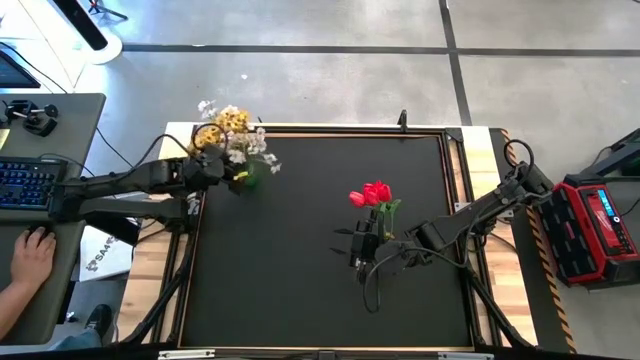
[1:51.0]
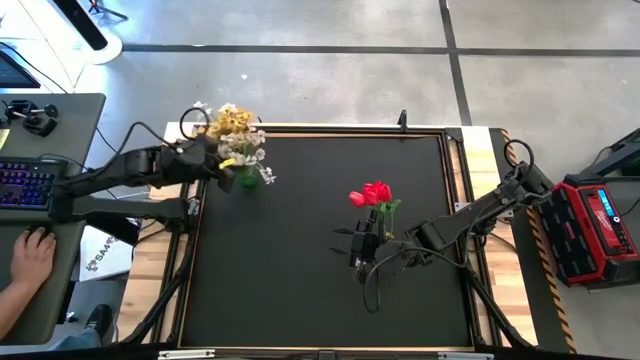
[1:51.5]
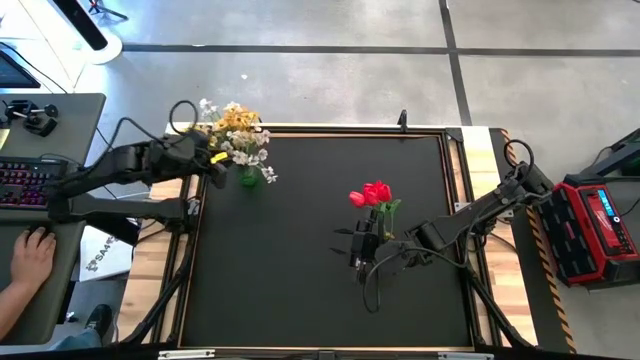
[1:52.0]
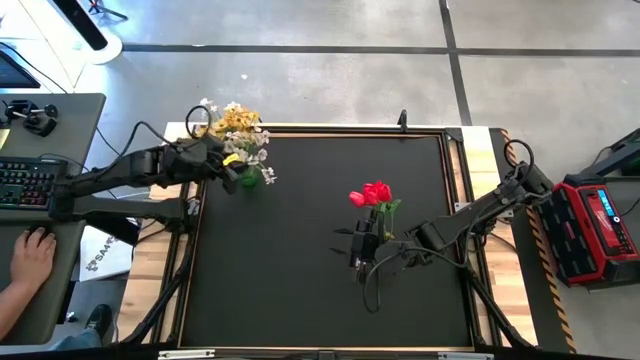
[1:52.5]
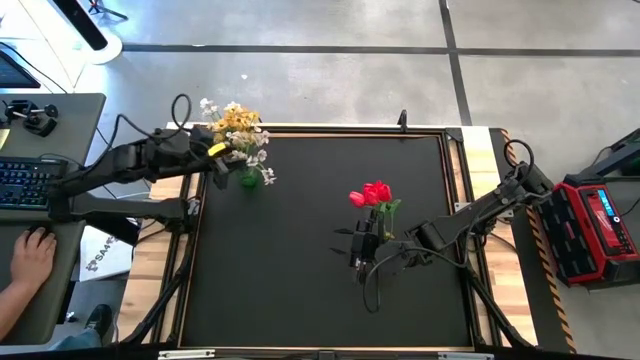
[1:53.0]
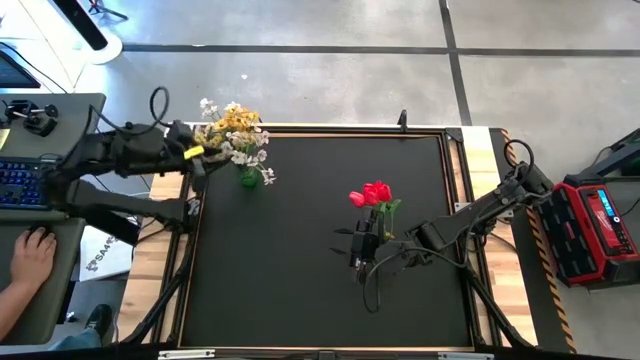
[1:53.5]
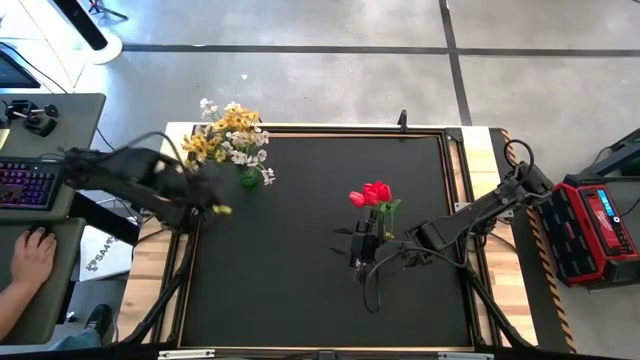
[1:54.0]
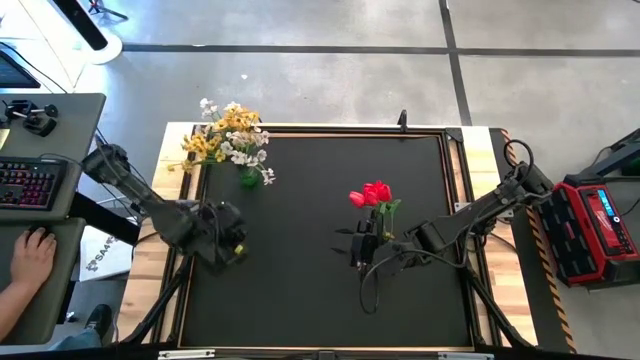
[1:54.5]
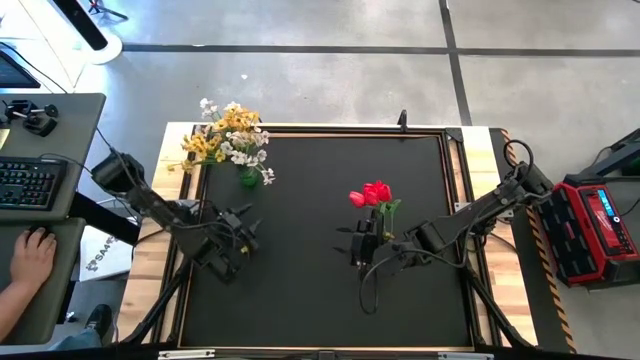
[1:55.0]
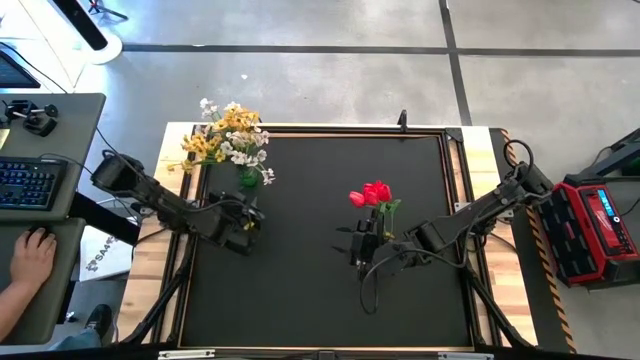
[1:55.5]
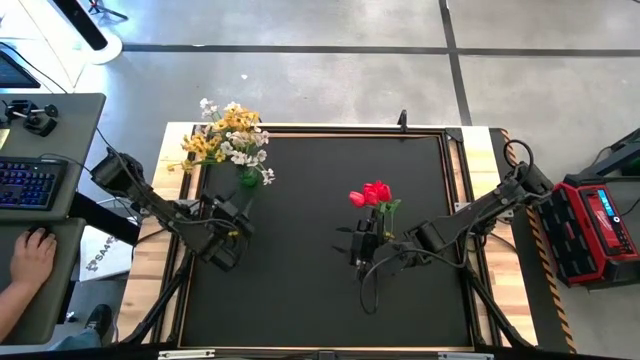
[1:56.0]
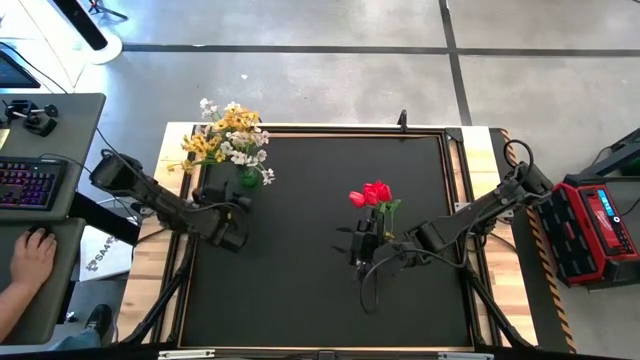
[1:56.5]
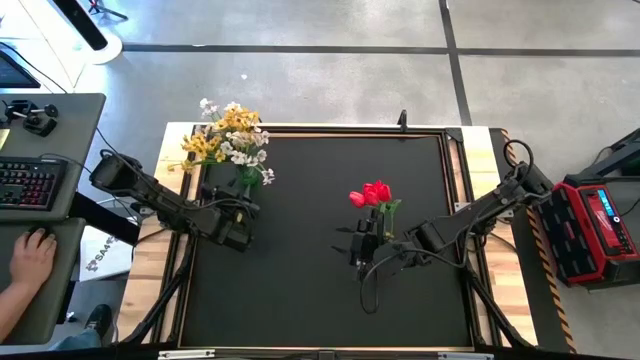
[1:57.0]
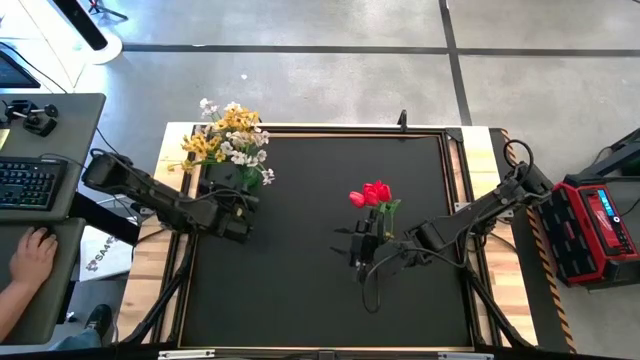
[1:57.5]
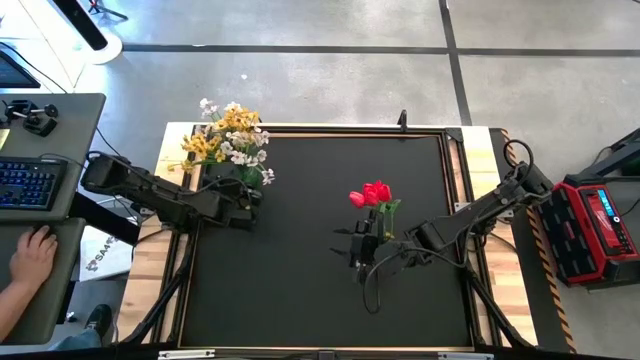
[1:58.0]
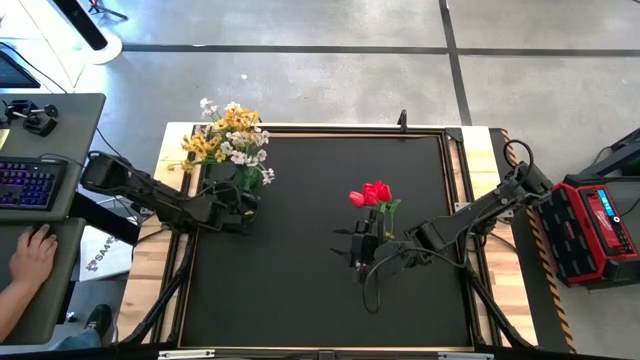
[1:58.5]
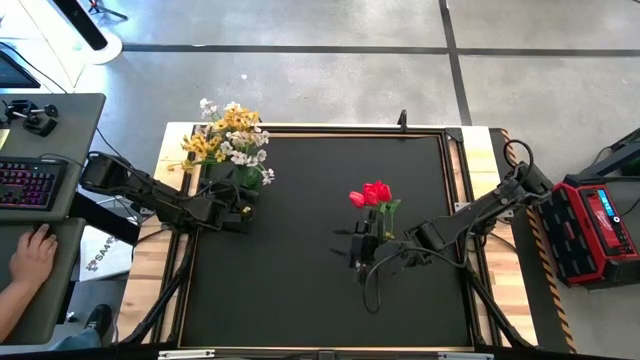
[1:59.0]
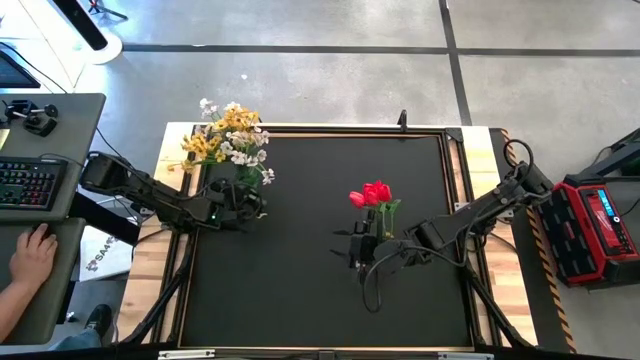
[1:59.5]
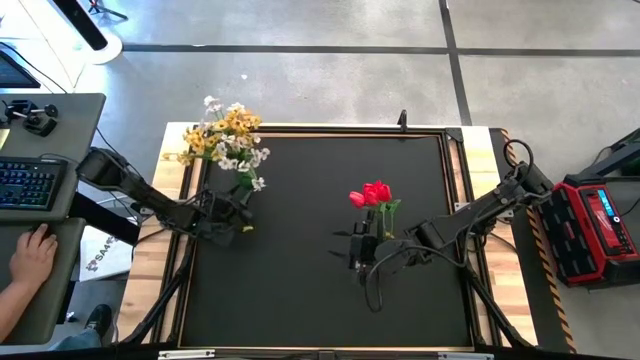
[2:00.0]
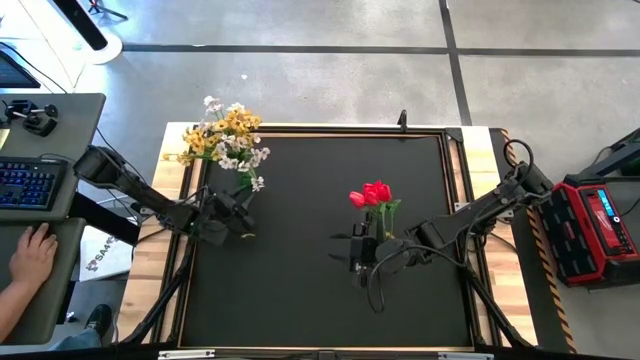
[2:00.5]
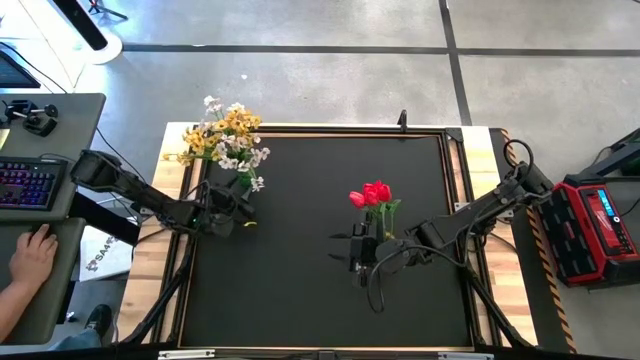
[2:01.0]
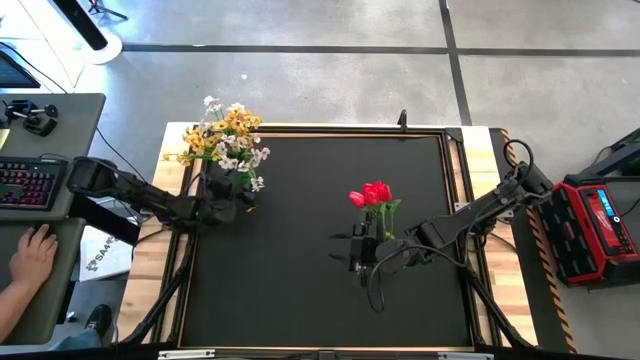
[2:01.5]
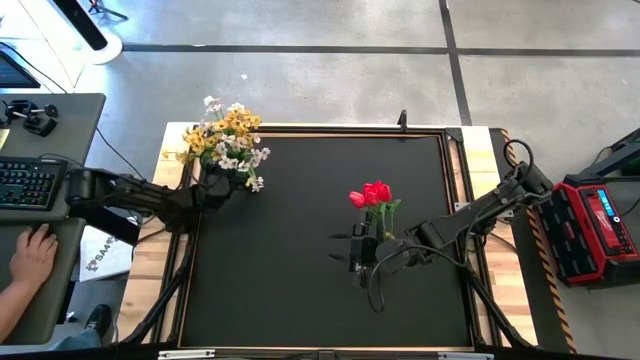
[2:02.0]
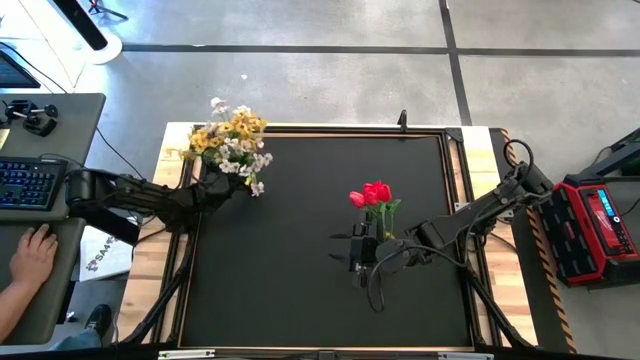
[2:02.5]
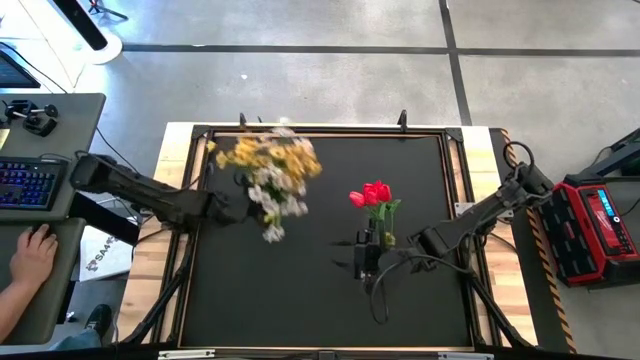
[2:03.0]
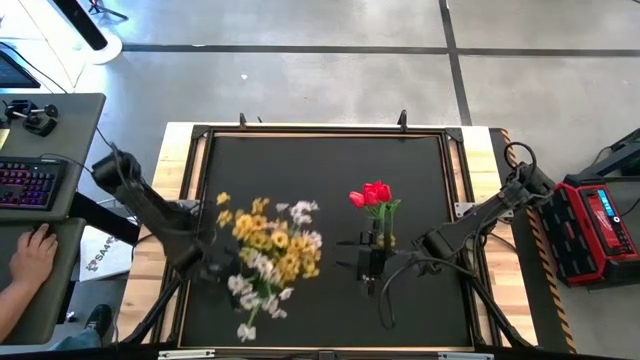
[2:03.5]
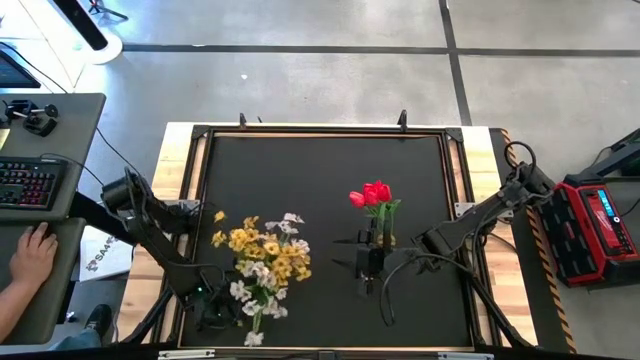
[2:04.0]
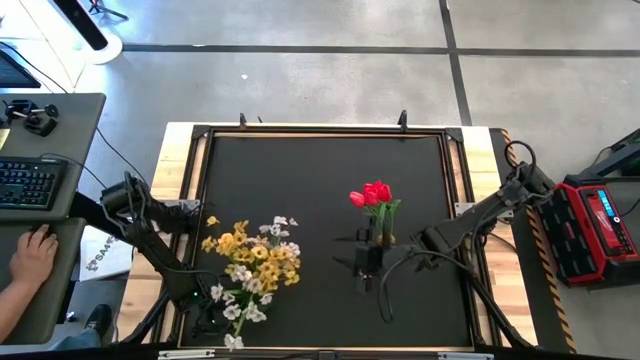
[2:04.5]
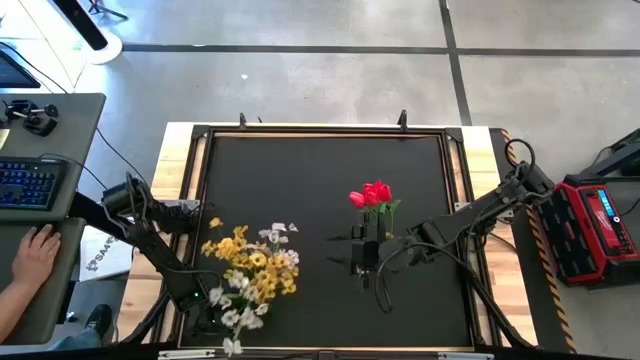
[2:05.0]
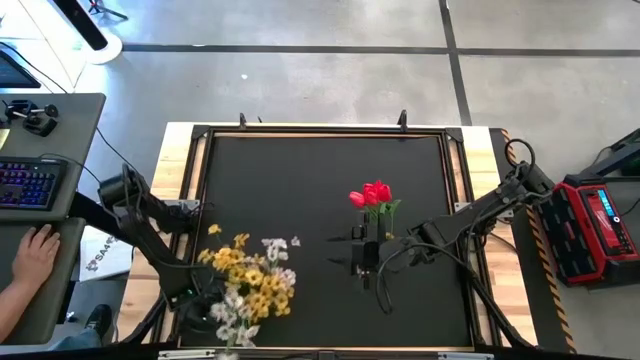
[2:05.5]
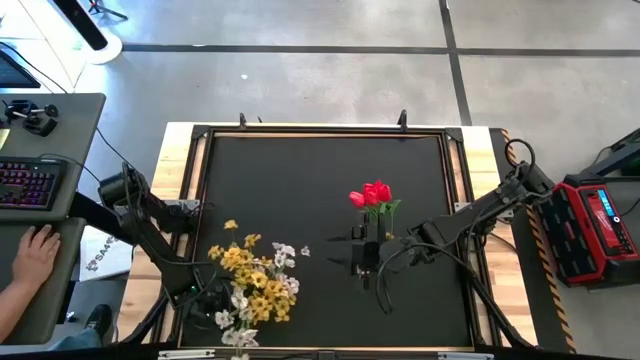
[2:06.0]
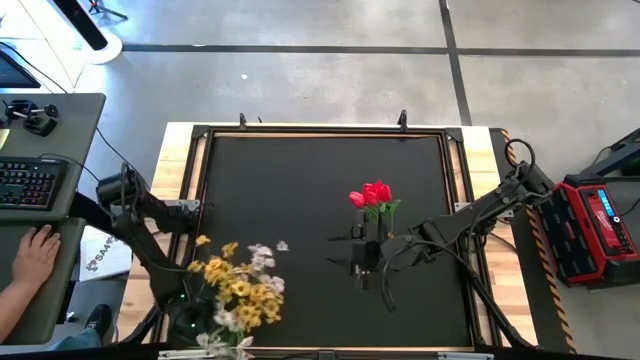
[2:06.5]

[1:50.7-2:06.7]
Task: Sort flowers into vase by color
Move the green flower vase to the bottom left of the table

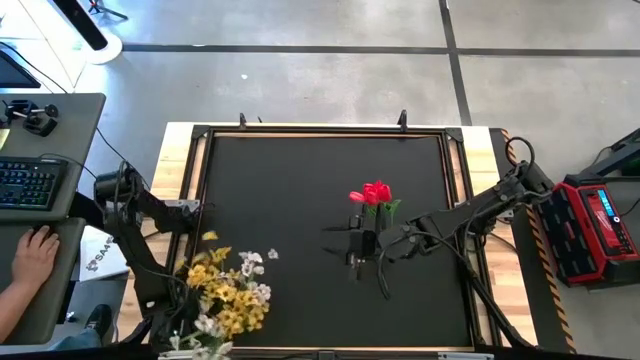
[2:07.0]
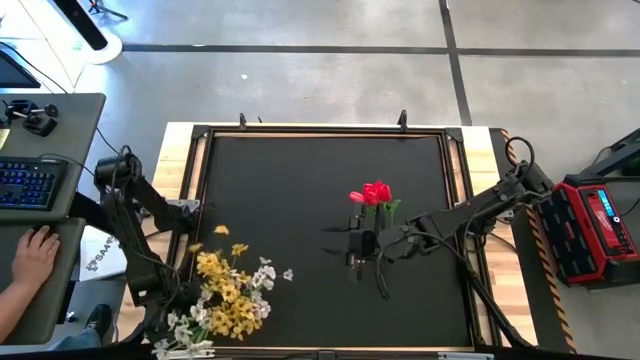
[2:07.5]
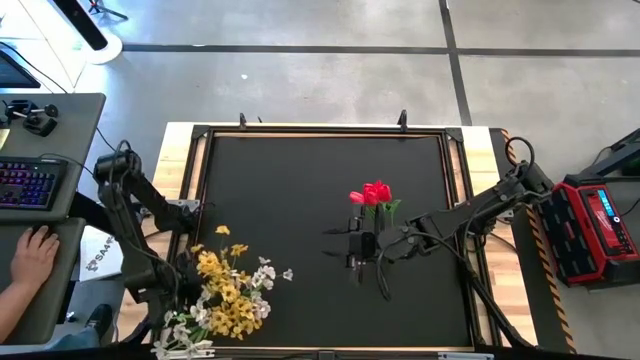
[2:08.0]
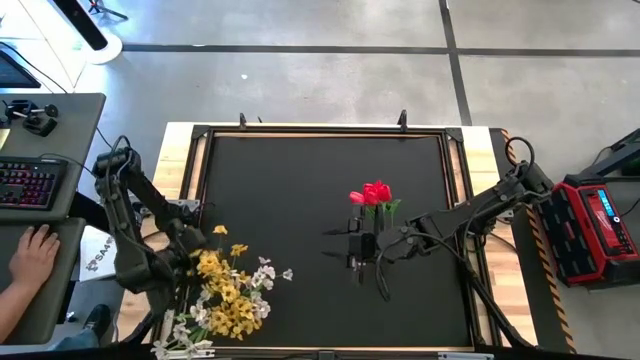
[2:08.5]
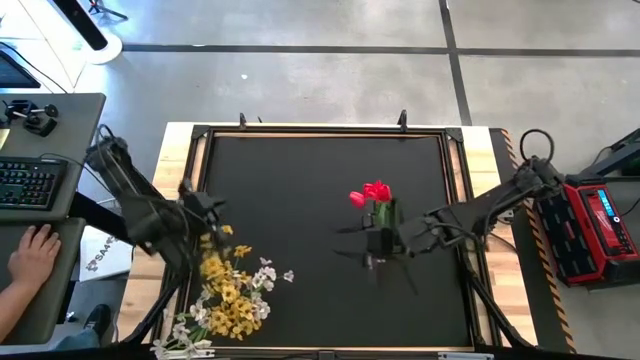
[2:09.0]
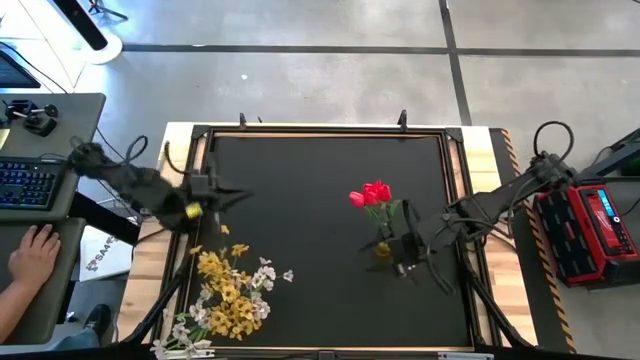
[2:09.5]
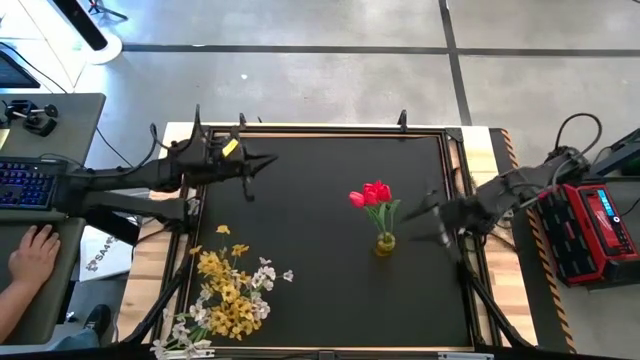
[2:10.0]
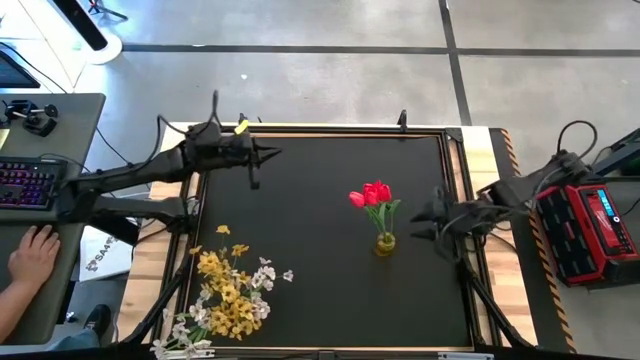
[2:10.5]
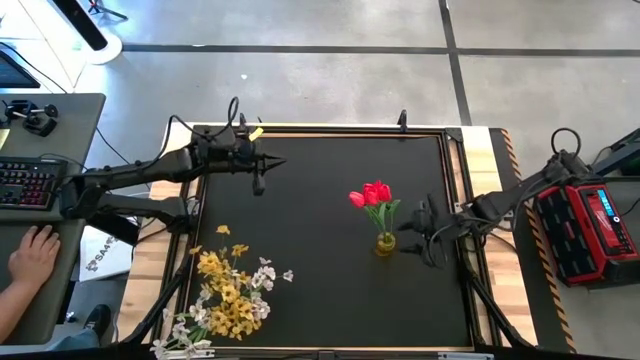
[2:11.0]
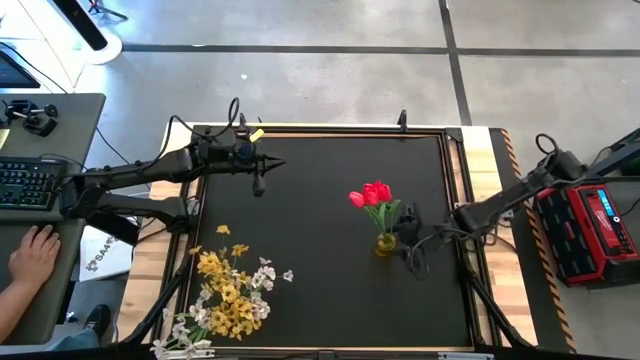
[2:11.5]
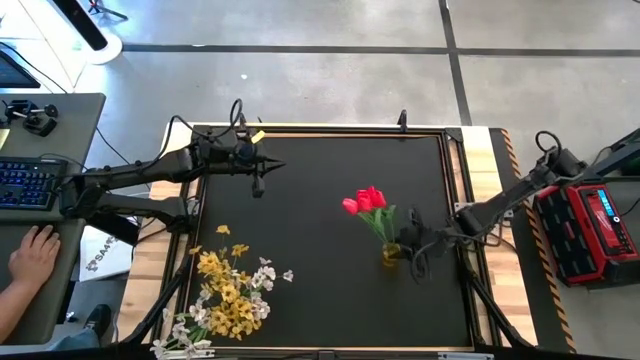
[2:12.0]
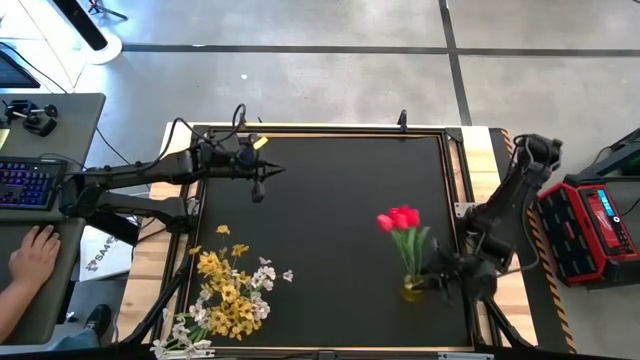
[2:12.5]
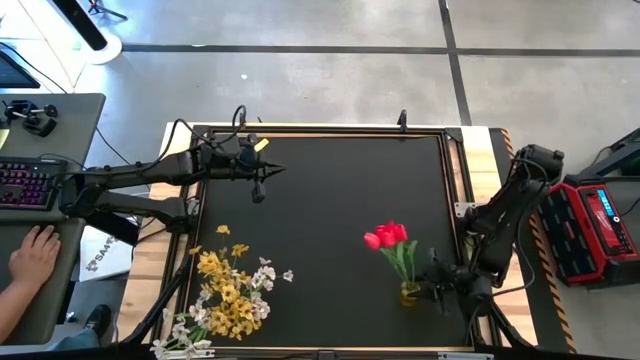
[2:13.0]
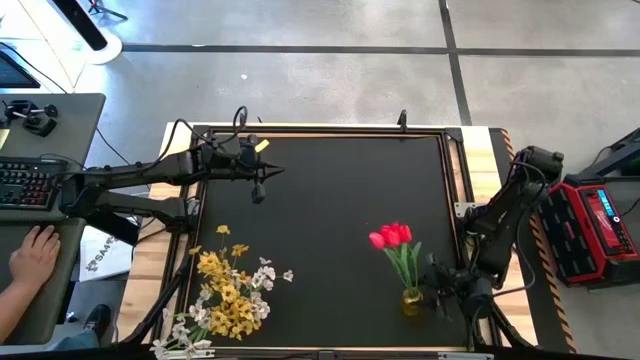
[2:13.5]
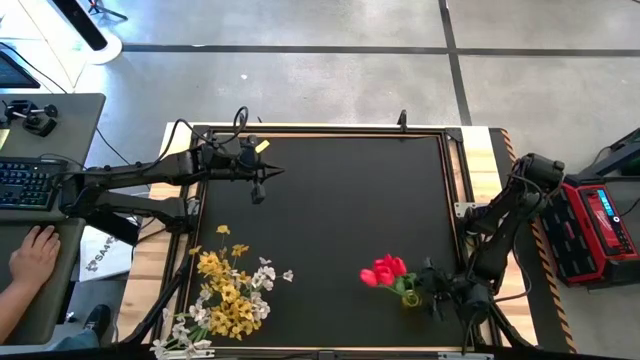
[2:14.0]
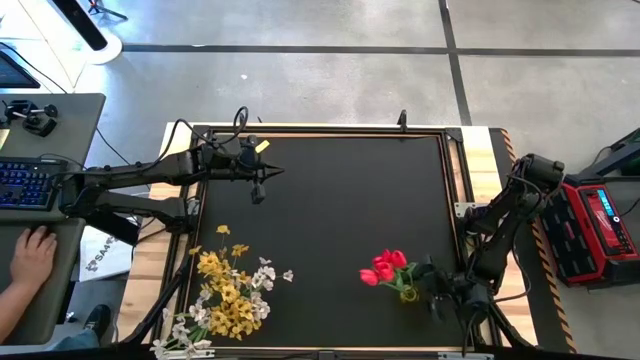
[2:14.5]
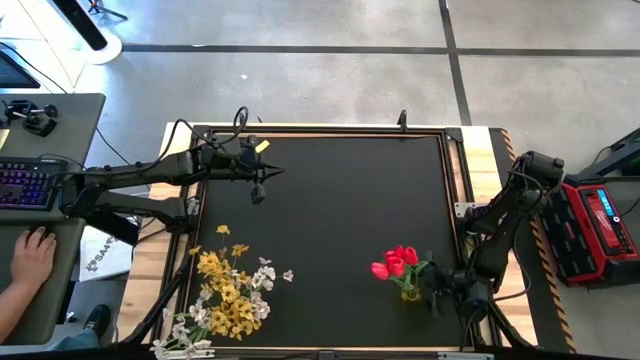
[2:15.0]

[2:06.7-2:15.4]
Move the yellow flower vase to the bottom right of the table
